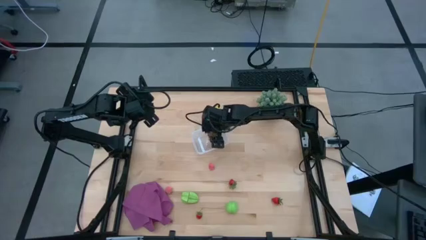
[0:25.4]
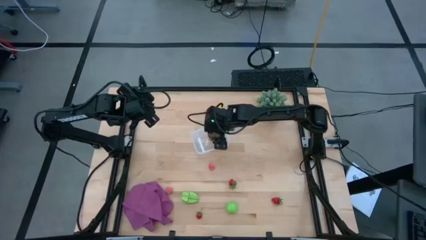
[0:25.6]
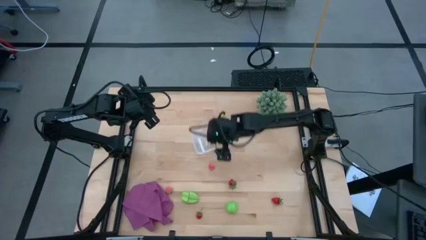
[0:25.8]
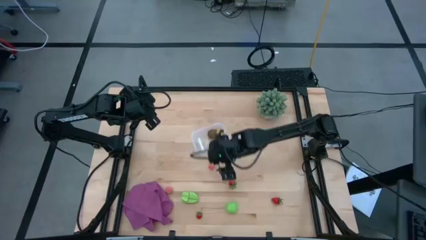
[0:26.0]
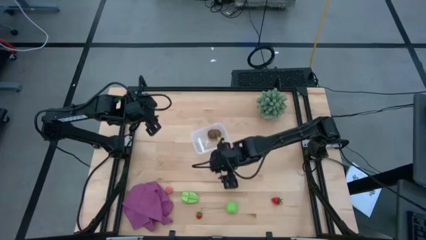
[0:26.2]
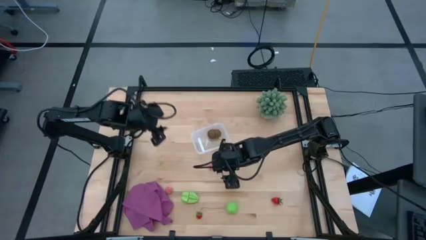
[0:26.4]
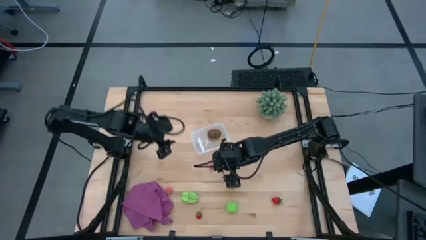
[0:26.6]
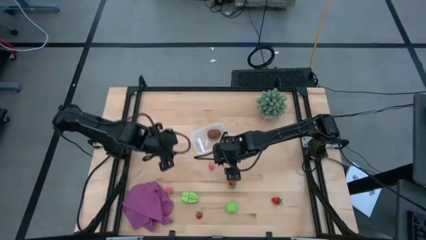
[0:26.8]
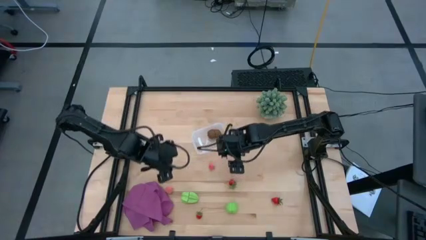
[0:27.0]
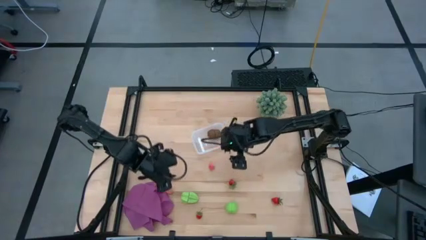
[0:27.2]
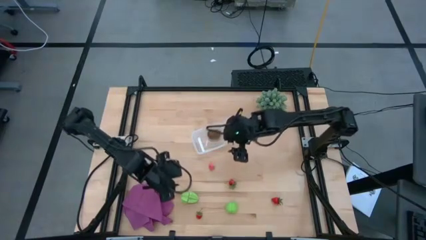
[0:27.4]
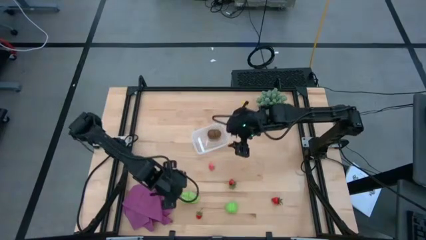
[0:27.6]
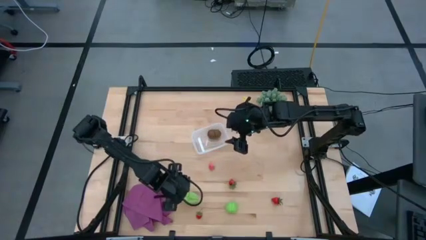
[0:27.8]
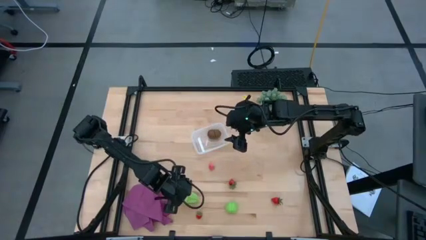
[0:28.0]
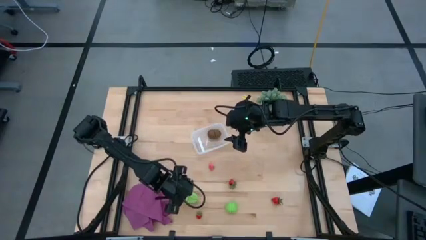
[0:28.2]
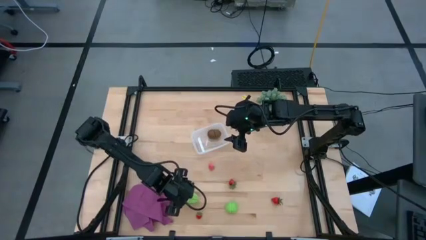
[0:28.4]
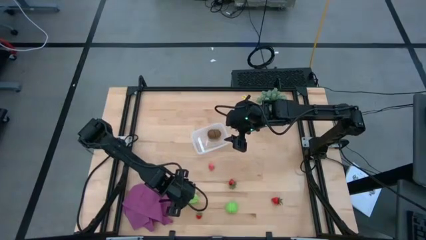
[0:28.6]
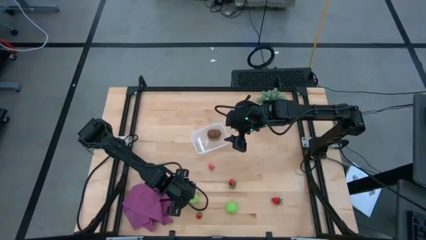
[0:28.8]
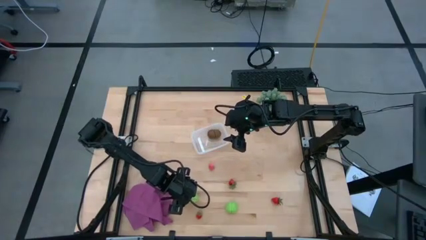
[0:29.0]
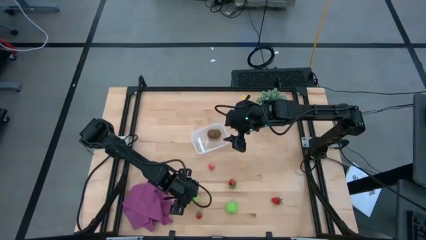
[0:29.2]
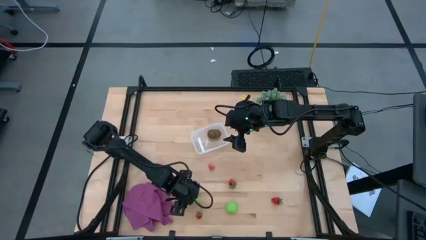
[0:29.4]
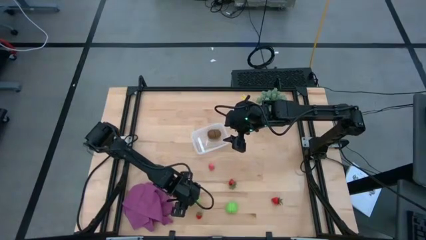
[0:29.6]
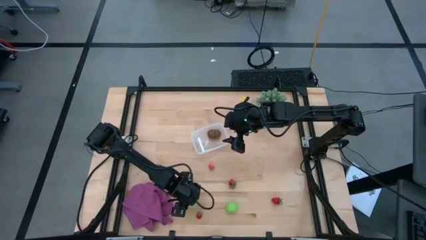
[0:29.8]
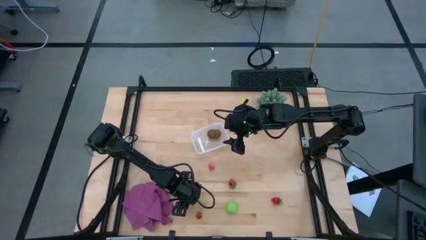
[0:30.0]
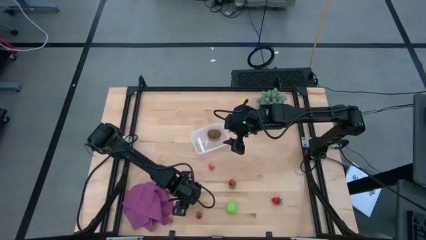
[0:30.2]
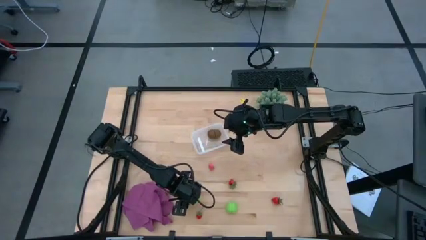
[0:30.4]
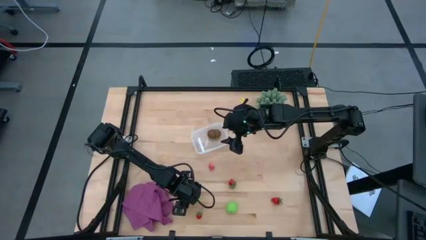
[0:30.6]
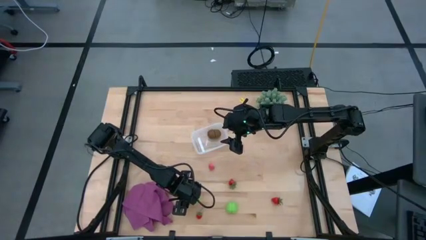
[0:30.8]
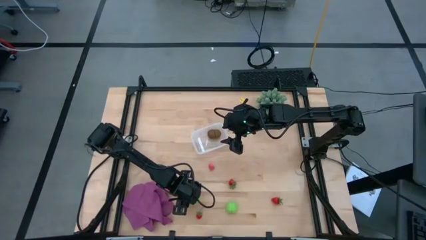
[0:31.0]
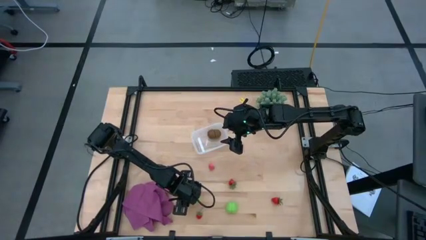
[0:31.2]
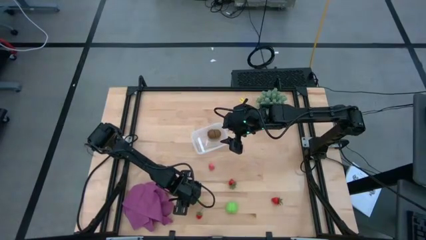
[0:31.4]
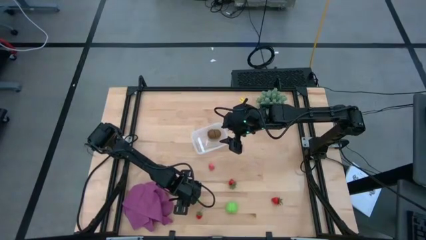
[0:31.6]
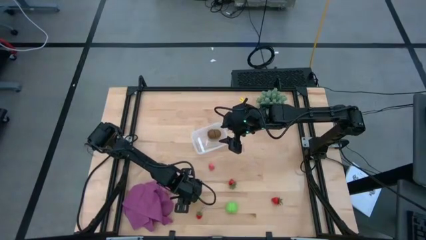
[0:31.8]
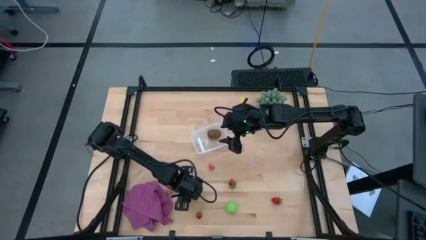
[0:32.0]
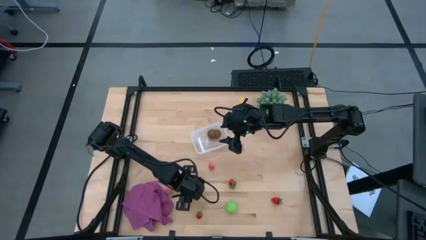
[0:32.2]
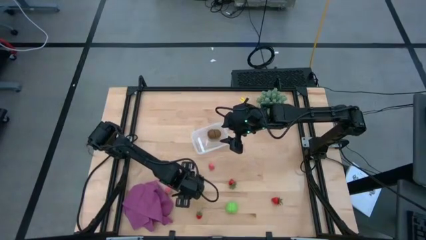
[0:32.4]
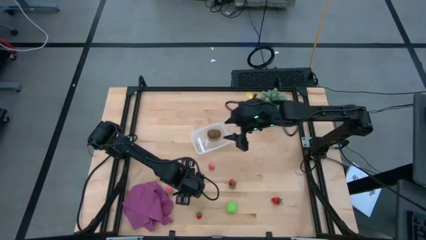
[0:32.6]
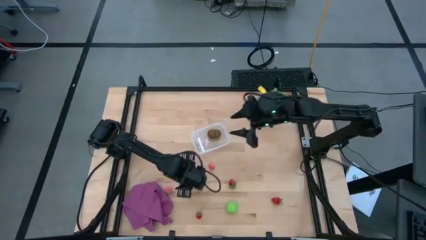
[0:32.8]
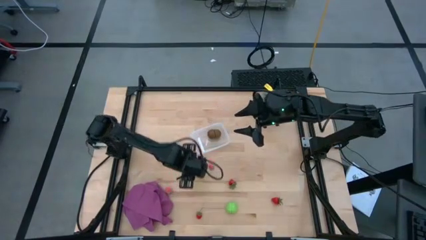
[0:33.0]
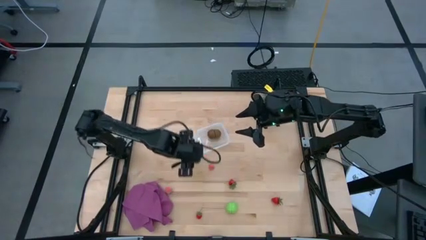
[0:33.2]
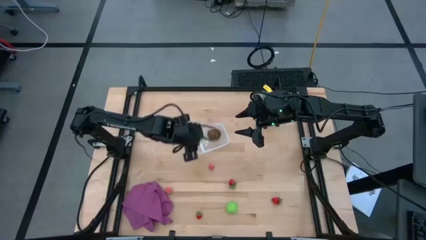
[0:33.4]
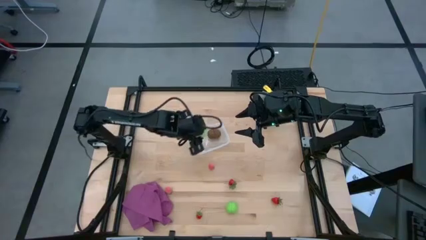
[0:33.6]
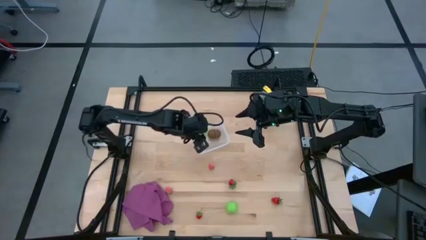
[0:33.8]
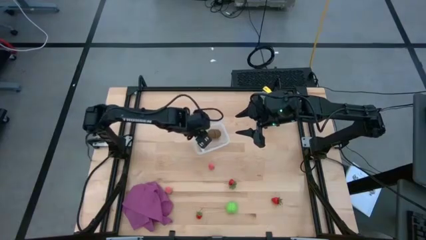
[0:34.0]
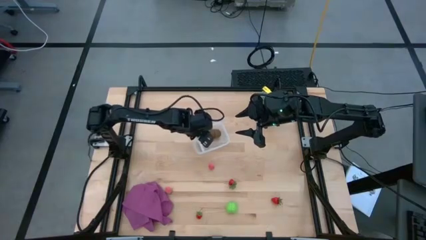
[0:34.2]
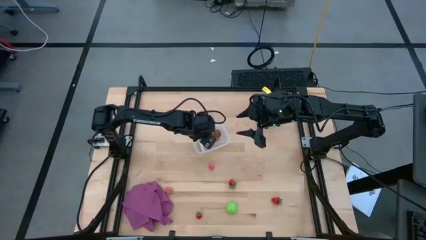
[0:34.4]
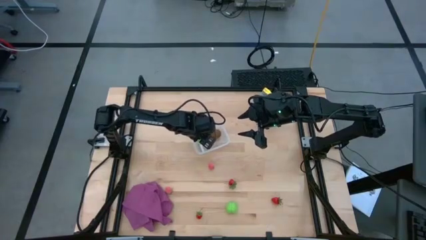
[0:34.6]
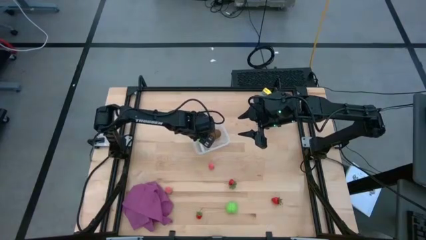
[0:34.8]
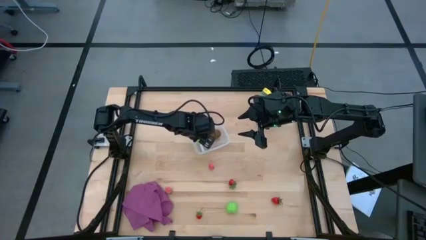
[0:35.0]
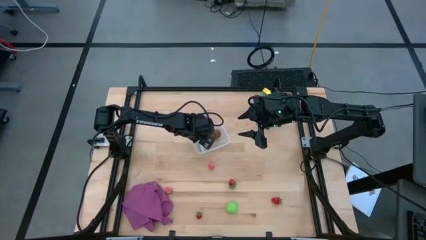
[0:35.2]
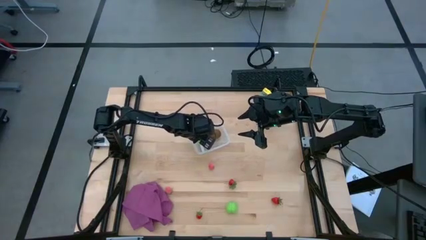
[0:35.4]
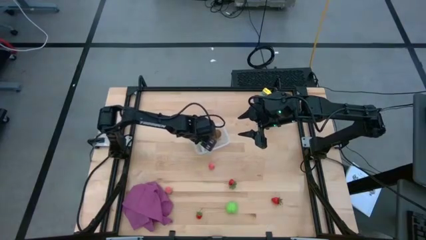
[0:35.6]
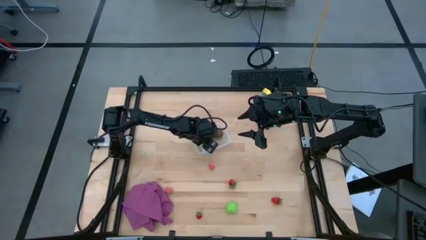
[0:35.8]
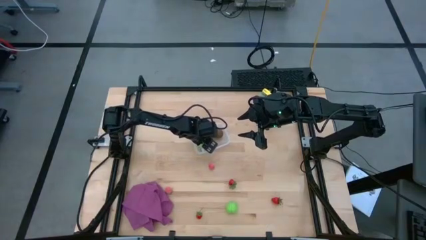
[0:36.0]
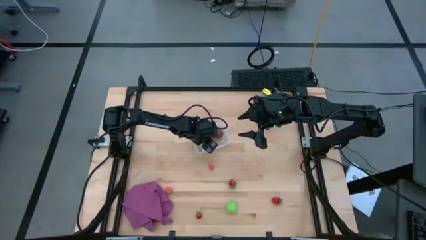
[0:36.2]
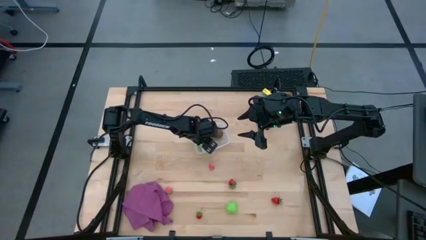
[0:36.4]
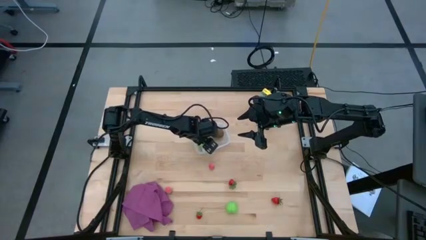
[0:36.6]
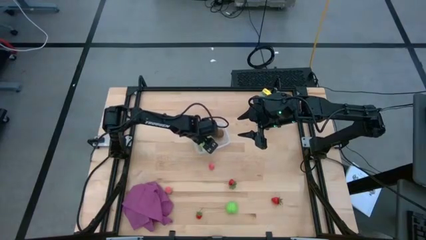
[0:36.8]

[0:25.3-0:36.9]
Task: Pick and placing Produce into tupperware
Put the green starfruit into the transparent container

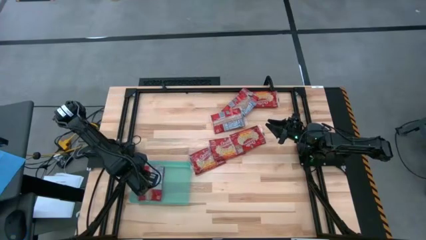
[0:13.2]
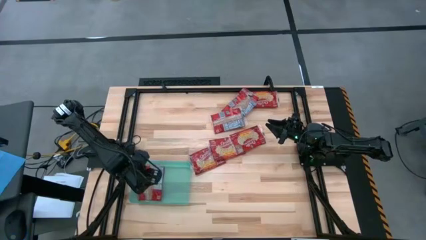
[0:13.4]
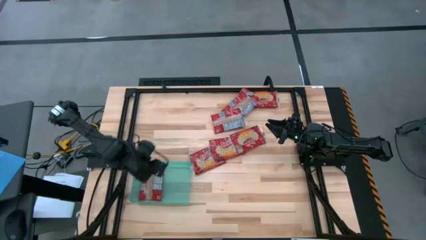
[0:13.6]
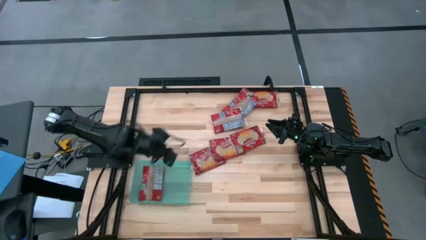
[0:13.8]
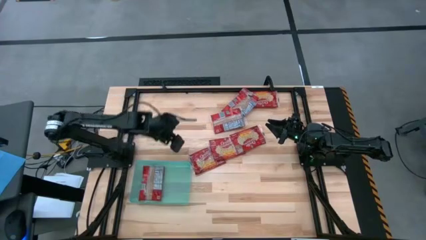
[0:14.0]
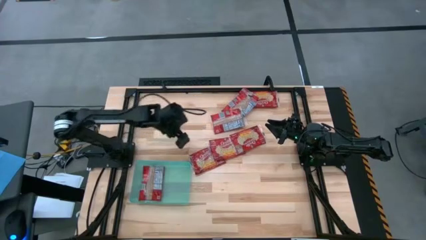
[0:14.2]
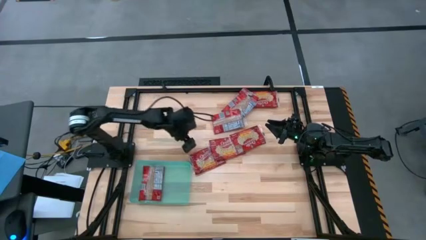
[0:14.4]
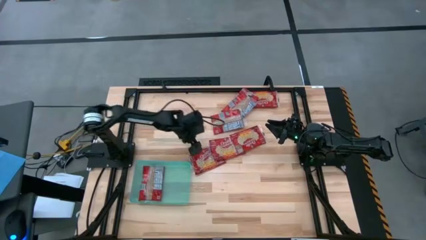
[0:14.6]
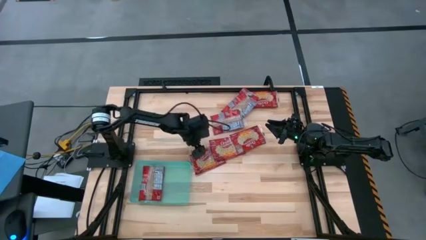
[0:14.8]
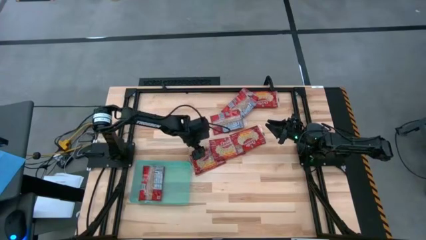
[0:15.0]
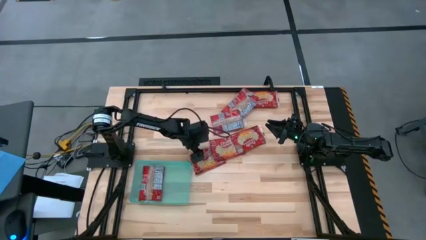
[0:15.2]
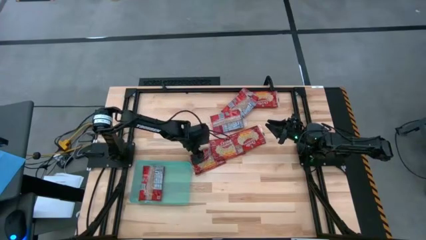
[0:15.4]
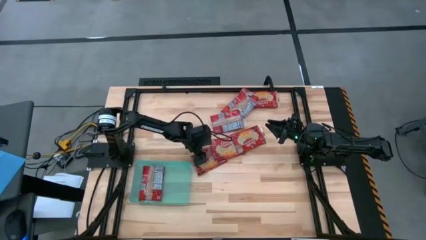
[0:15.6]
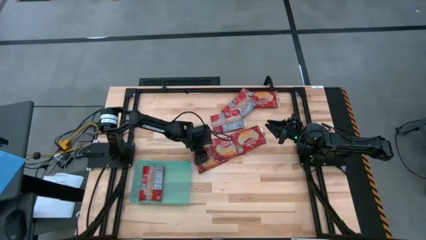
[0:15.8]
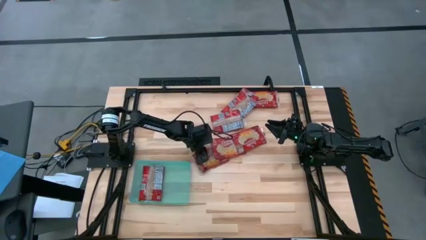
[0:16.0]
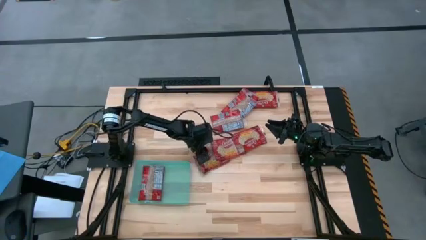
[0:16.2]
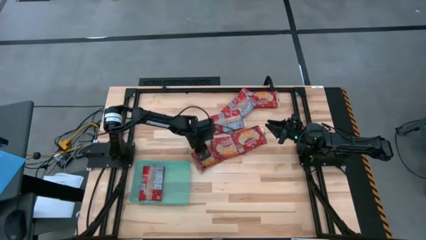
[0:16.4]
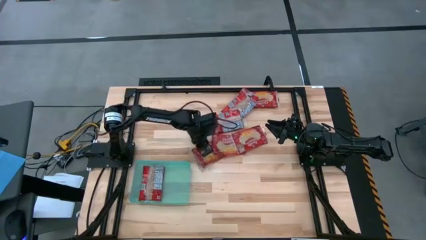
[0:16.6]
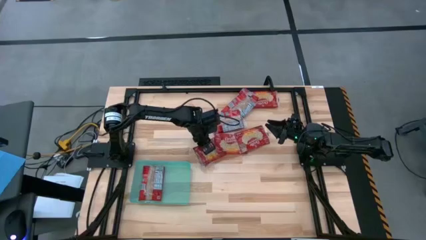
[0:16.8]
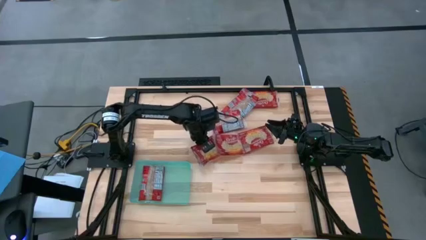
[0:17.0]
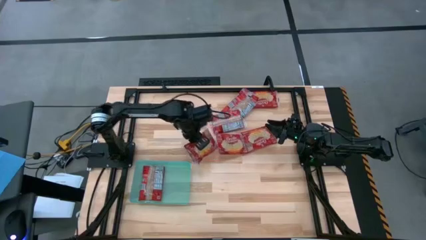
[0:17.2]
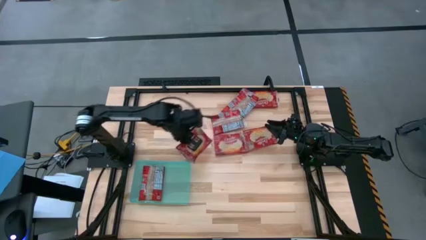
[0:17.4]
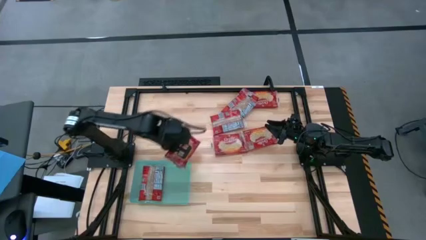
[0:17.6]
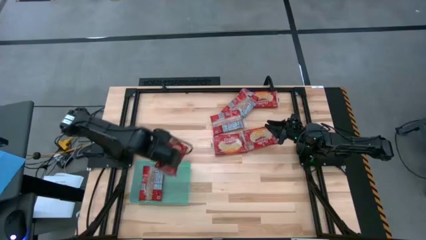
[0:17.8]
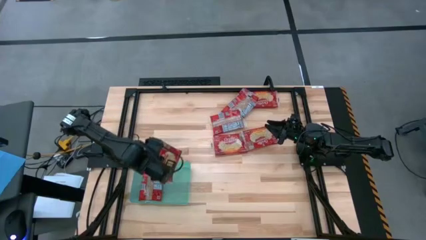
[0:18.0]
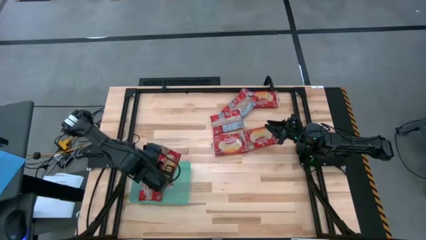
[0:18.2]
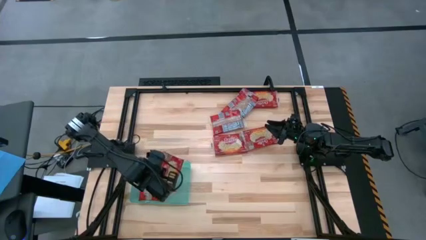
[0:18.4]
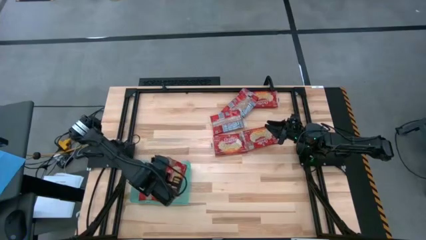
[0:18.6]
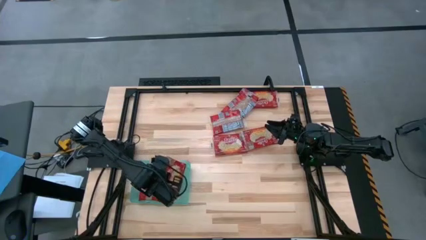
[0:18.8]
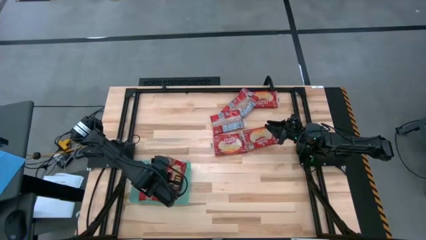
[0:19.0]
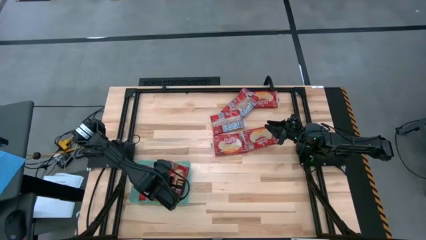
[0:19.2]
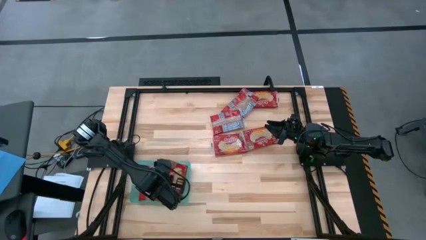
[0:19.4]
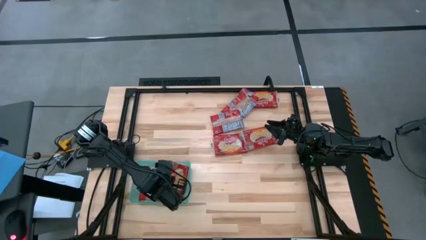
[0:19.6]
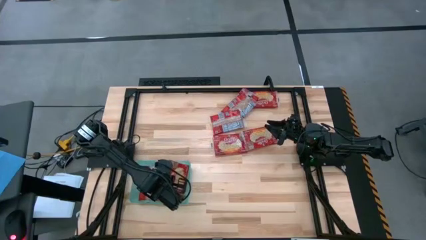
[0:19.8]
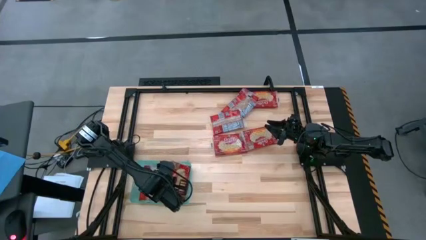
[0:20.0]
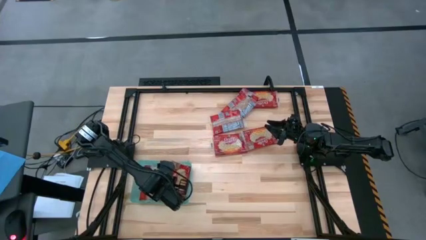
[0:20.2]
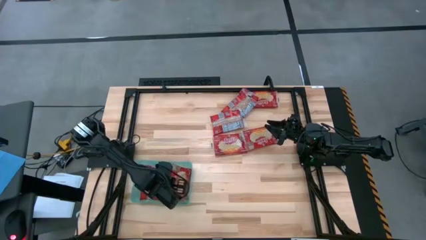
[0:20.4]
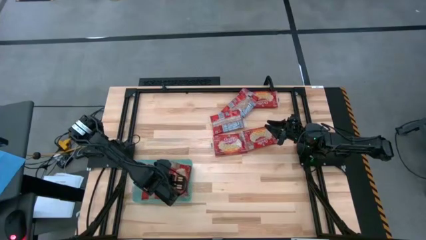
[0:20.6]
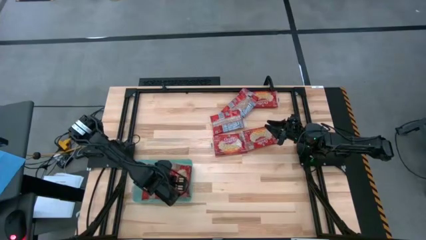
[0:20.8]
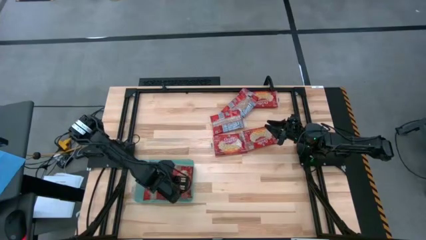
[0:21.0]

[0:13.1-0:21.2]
Task: Sort popcorn bags into baskets
Put the red popcorn pack into the green bin
